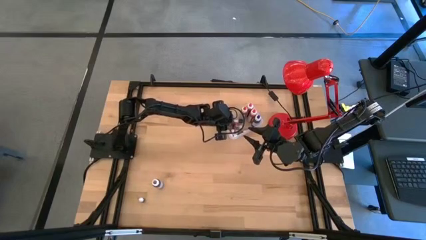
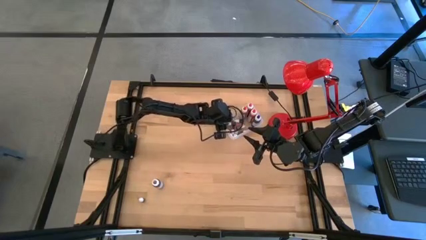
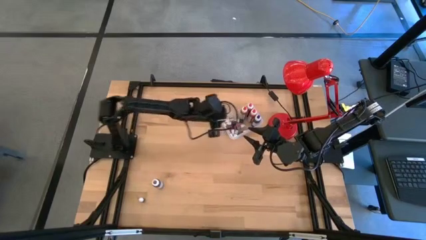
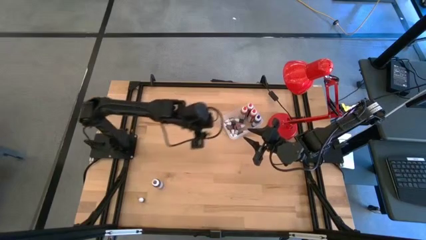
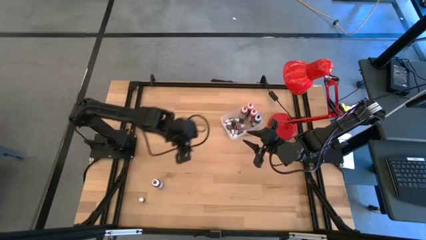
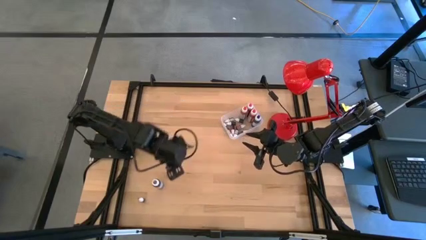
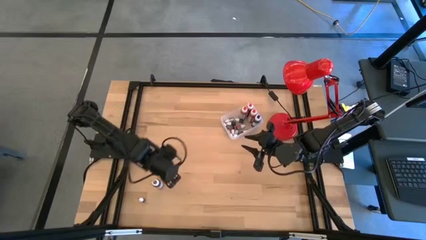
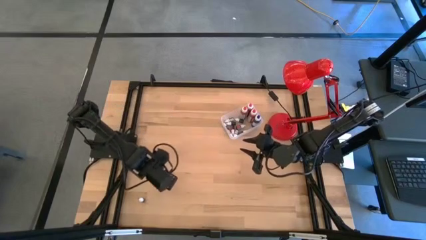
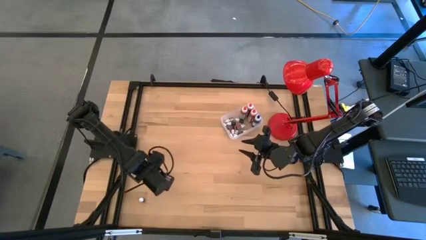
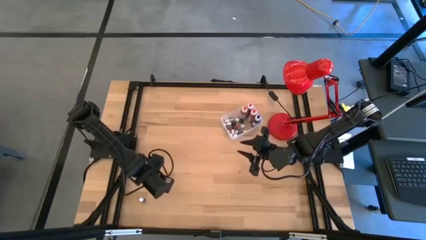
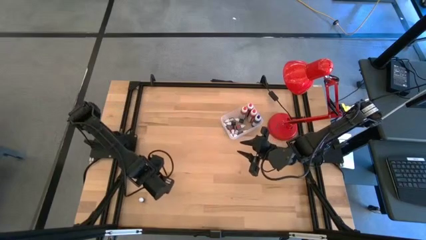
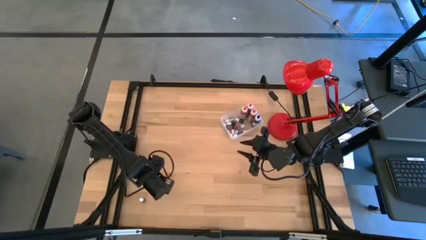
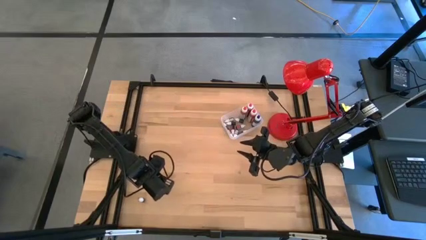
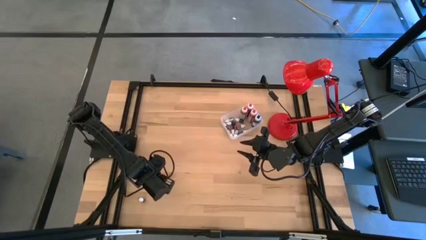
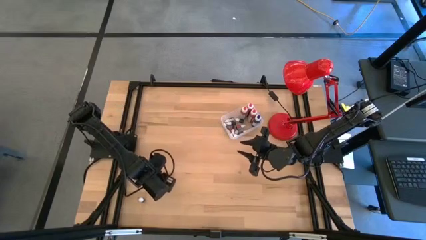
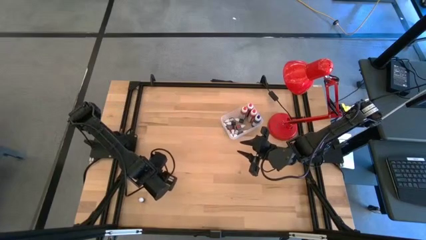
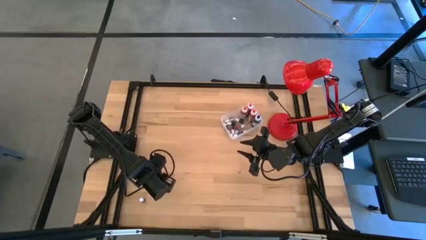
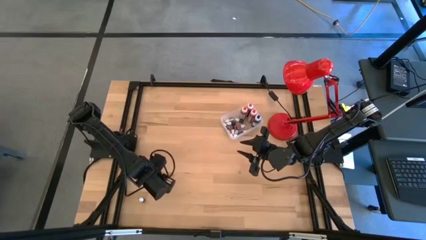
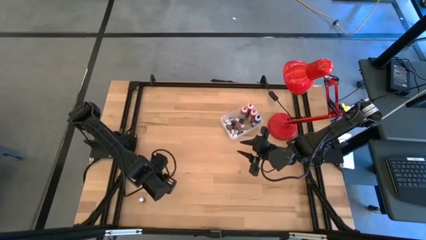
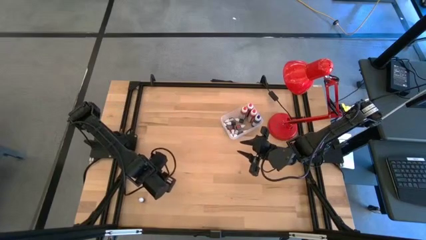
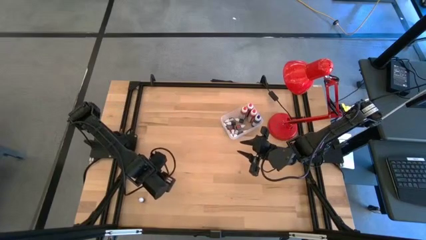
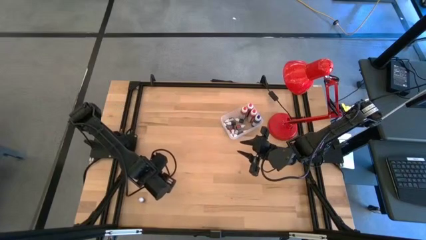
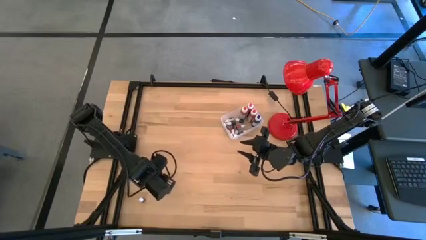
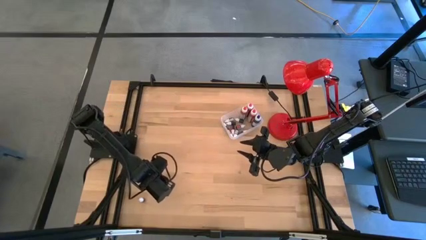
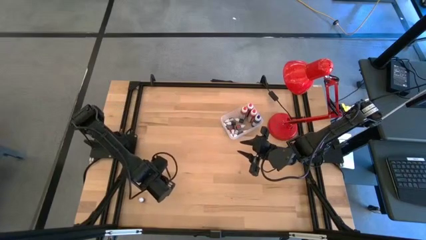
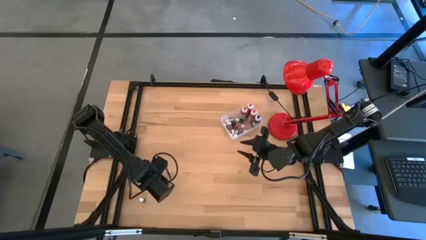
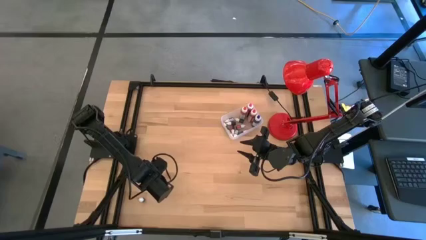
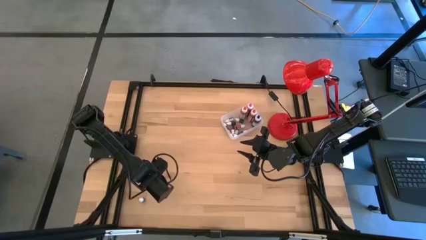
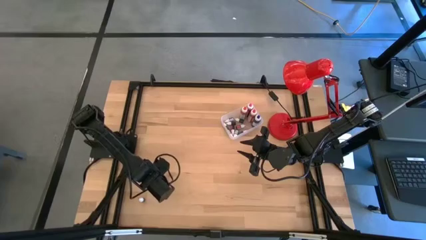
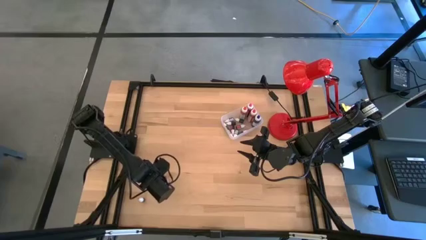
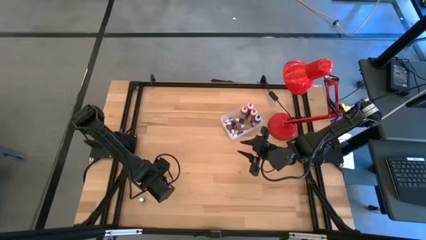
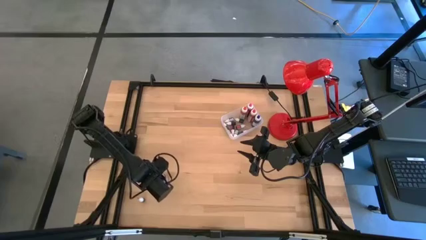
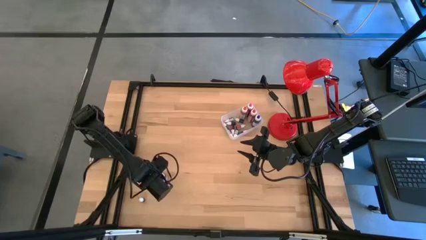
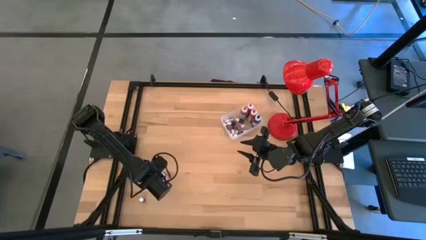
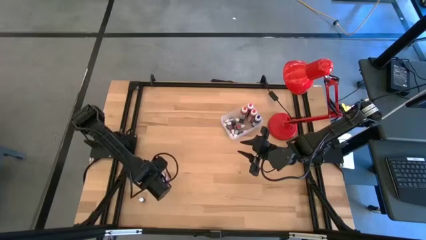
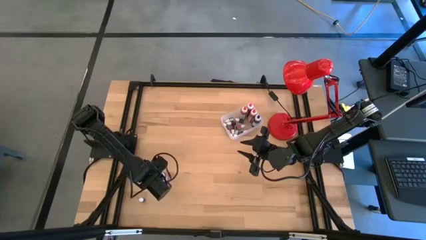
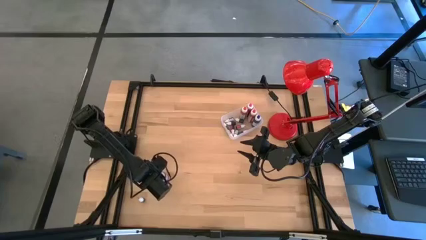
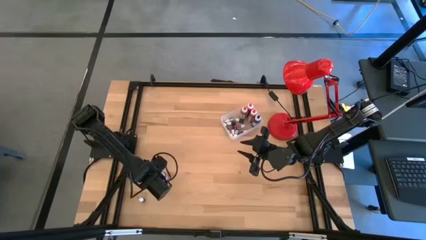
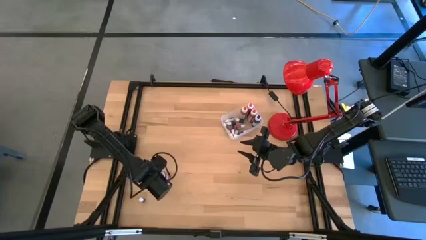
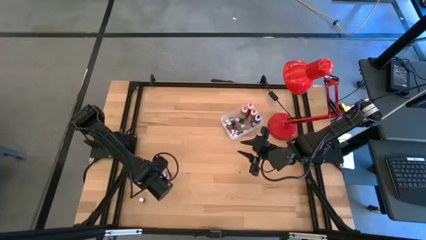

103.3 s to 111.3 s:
Task: Pick & Place food coloring
Put the big purple food coloring bottle in the transparent bin

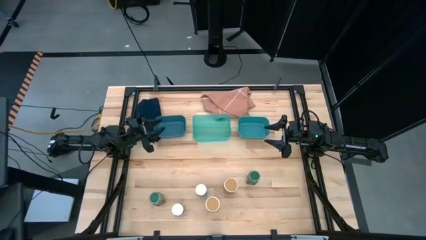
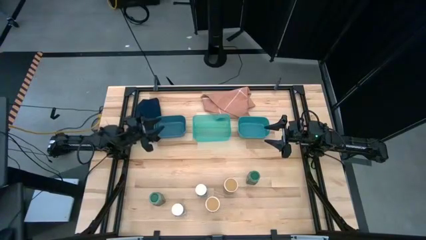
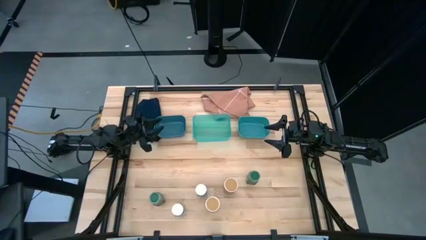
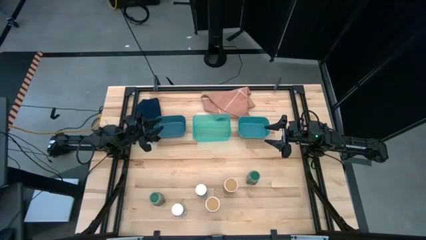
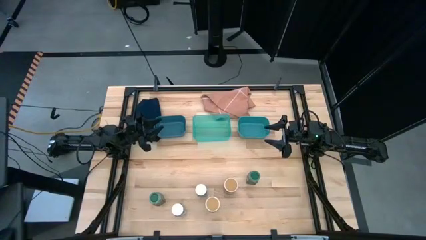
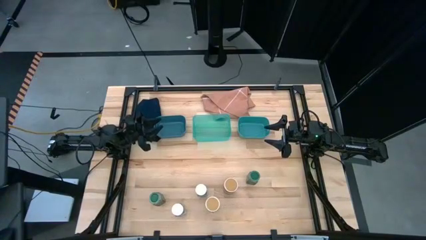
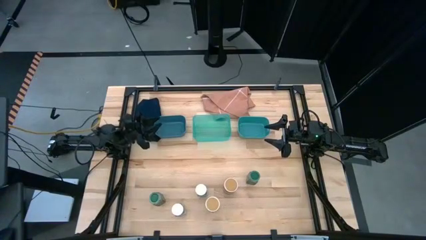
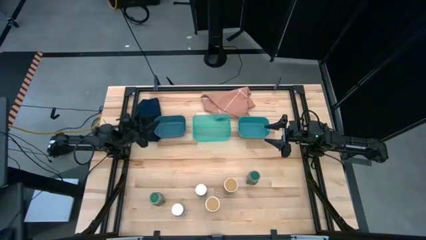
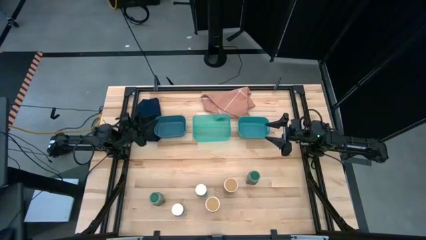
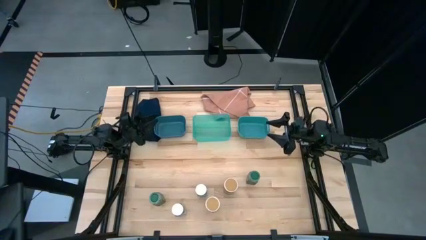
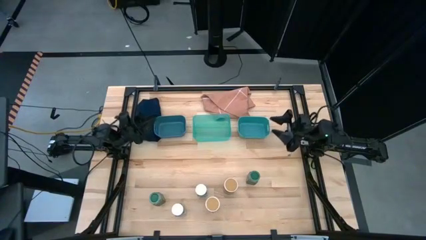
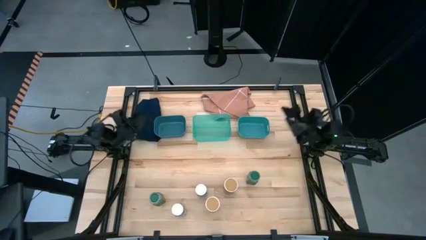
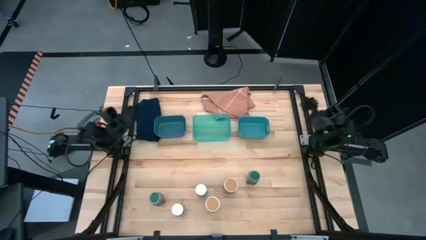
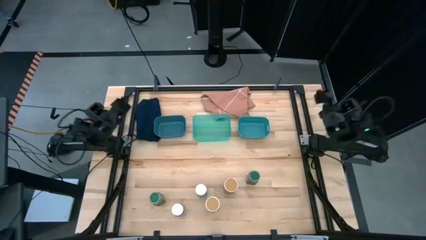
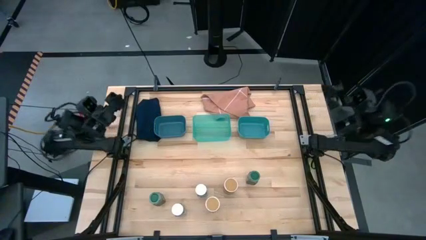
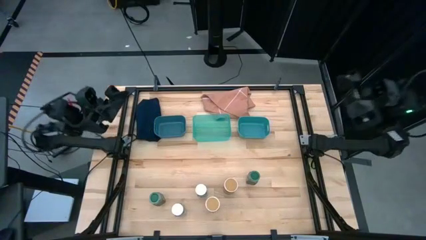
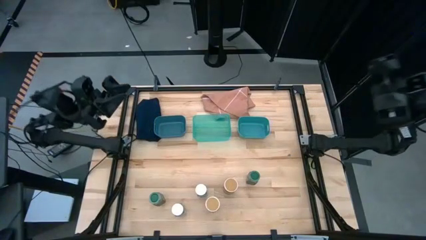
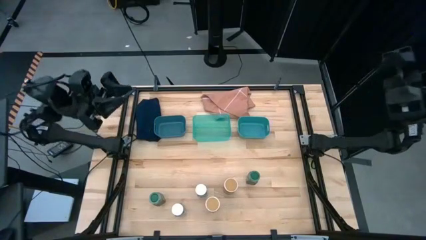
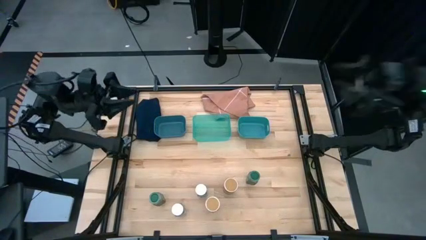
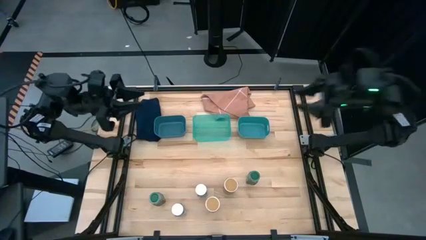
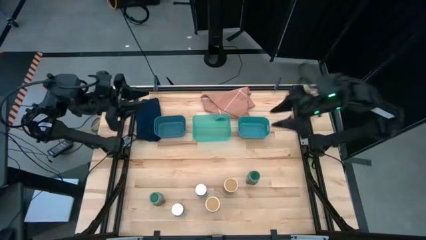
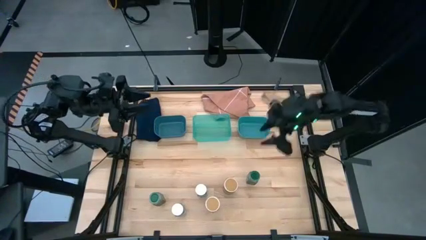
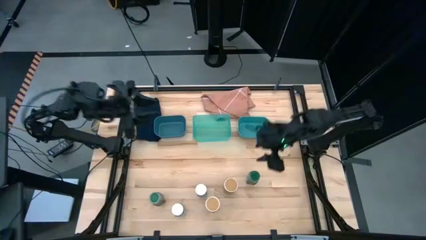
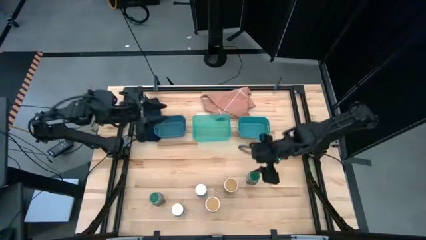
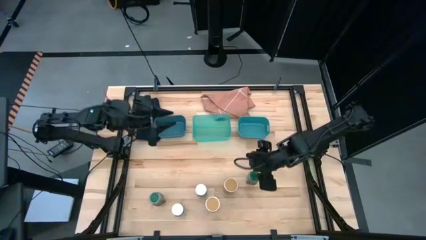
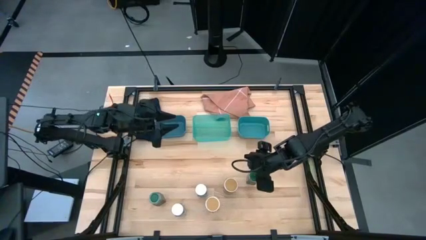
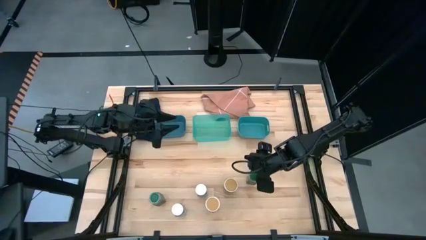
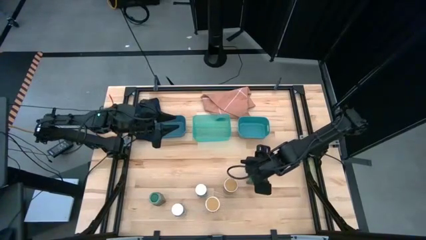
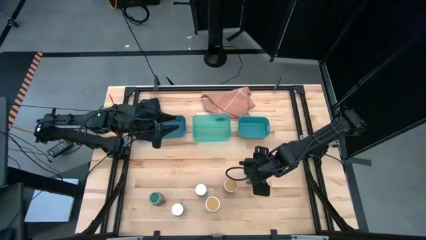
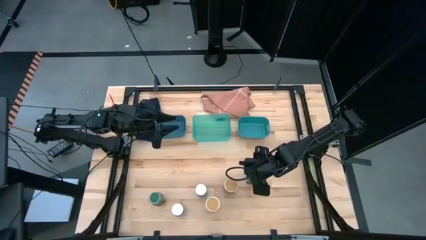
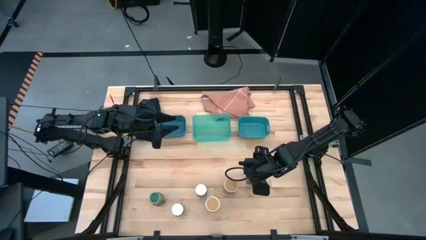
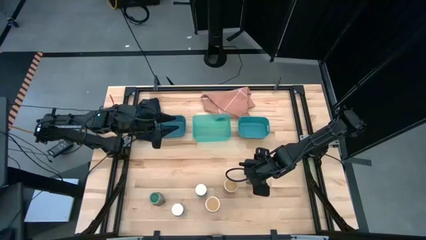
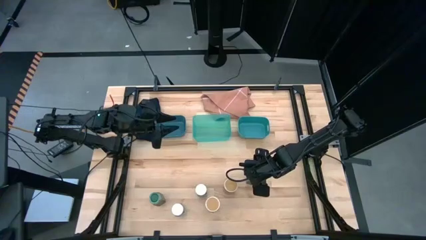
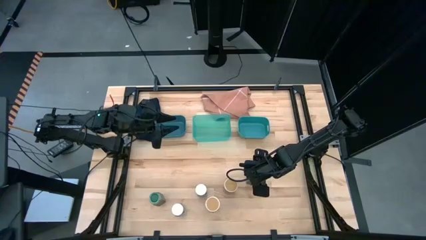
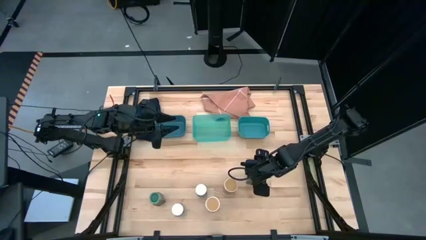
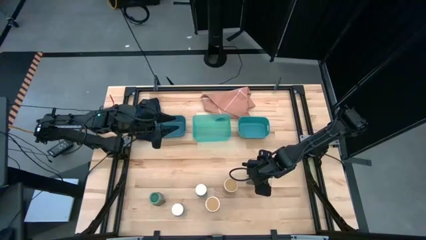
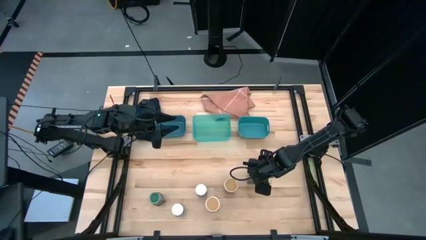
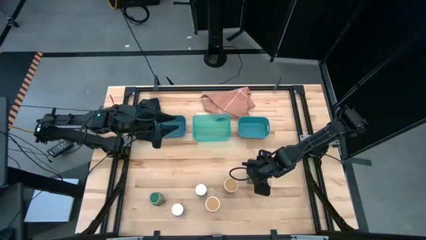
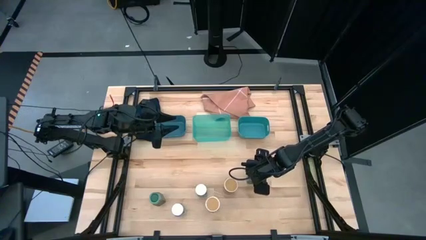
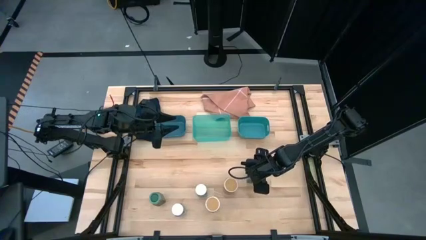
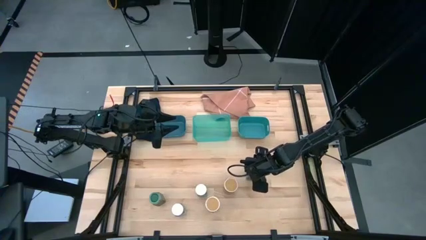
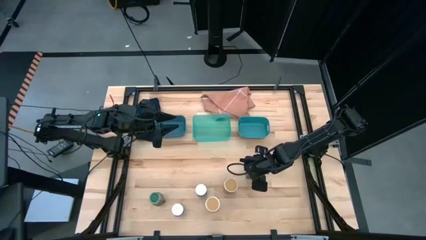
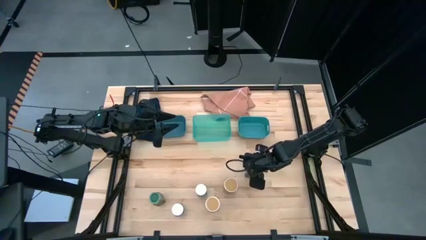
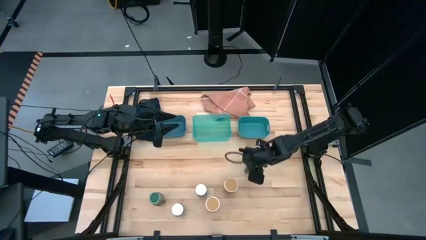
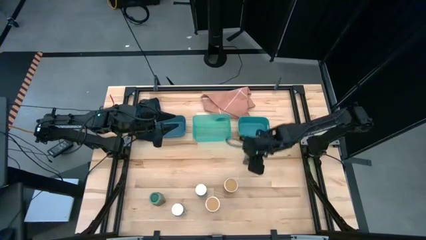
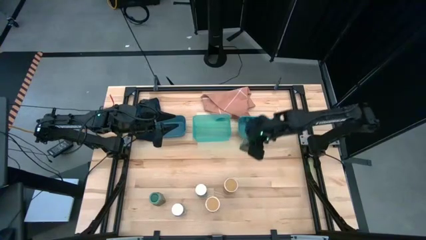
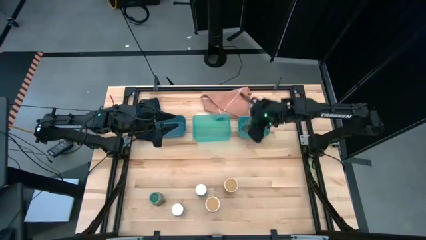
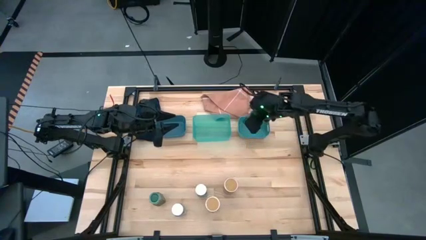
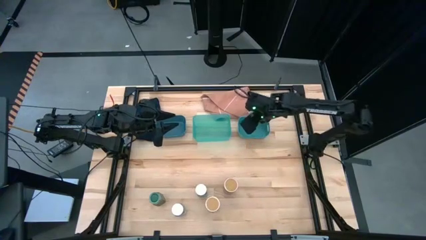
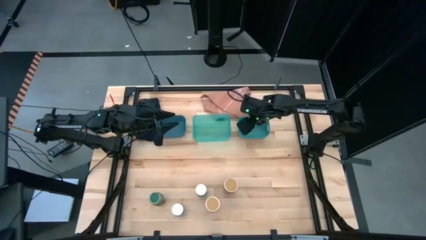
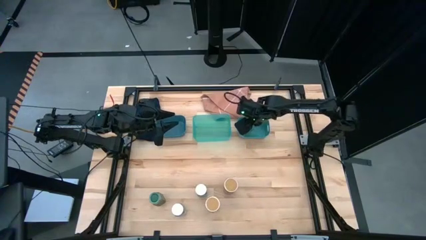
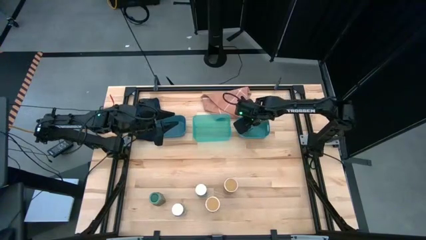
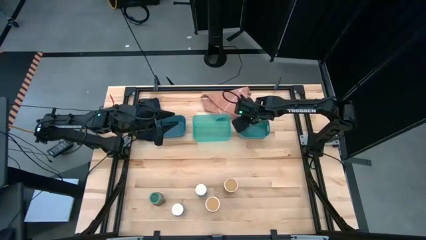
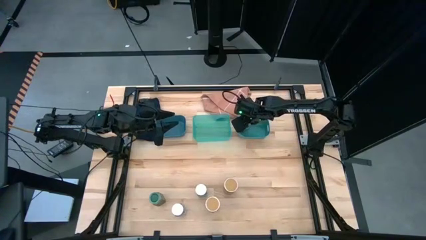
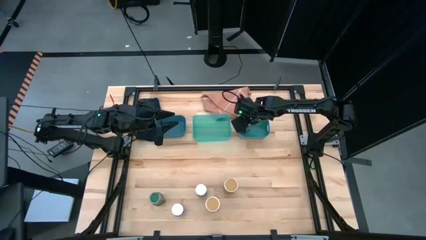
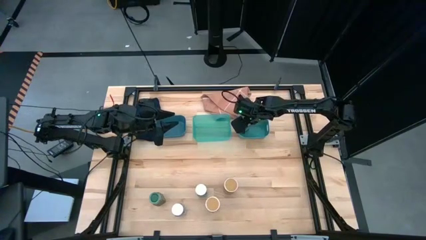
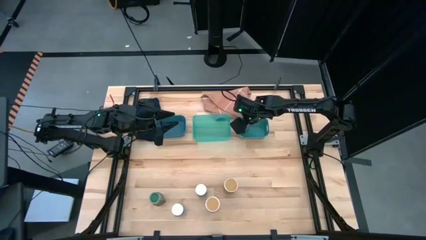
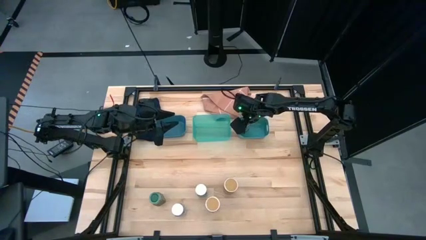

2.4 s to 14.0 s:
Task: Sort spices by type
Put the top green seasoning bottle into the light green bin
